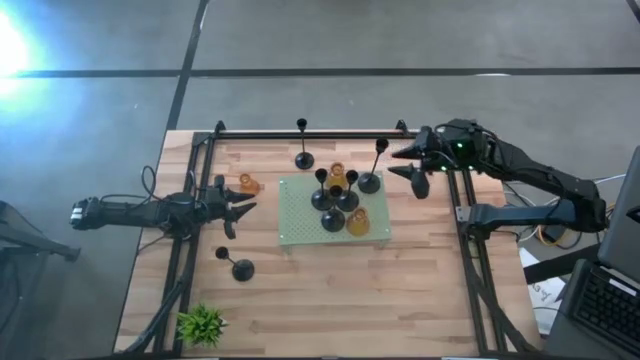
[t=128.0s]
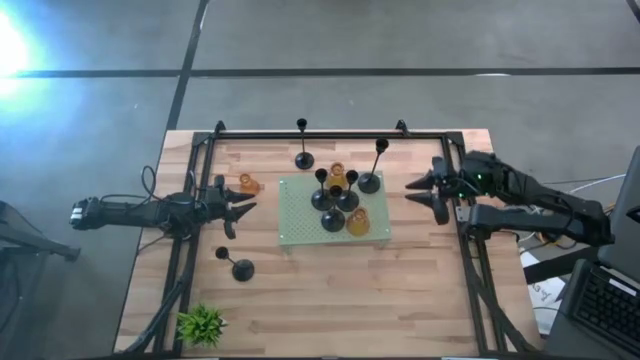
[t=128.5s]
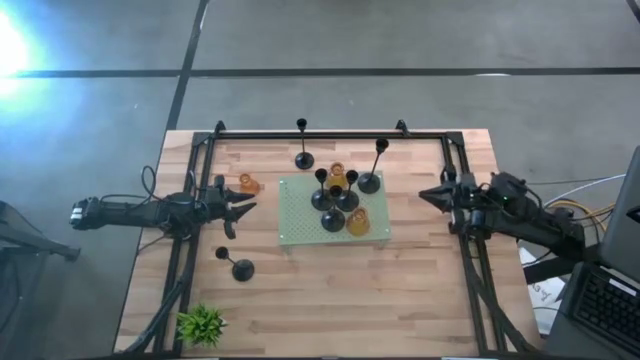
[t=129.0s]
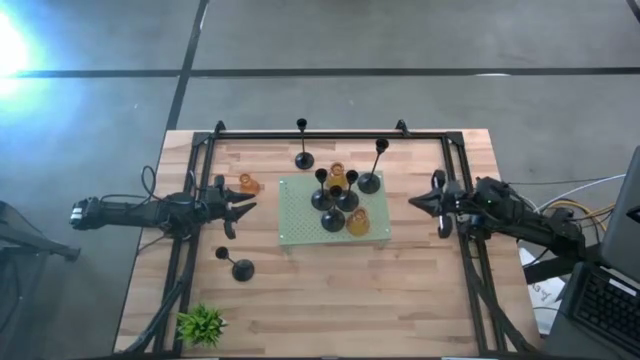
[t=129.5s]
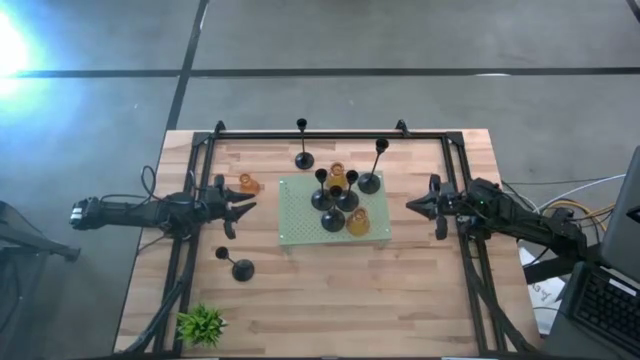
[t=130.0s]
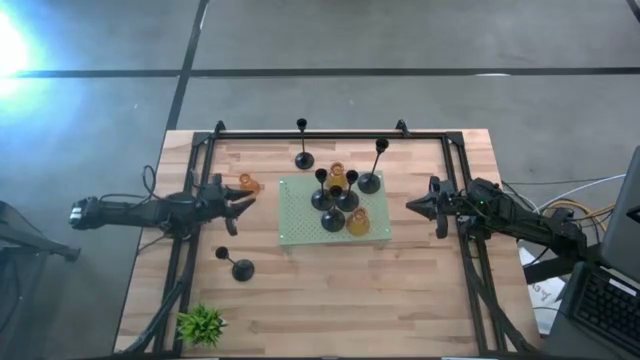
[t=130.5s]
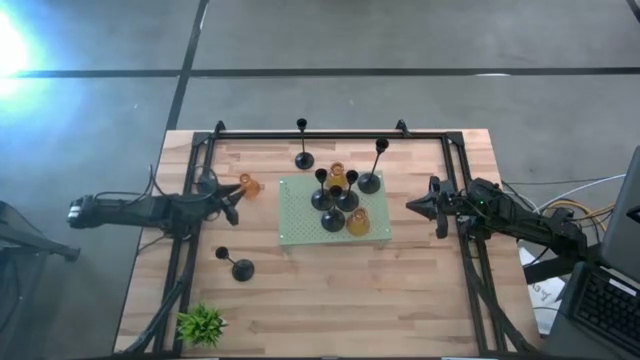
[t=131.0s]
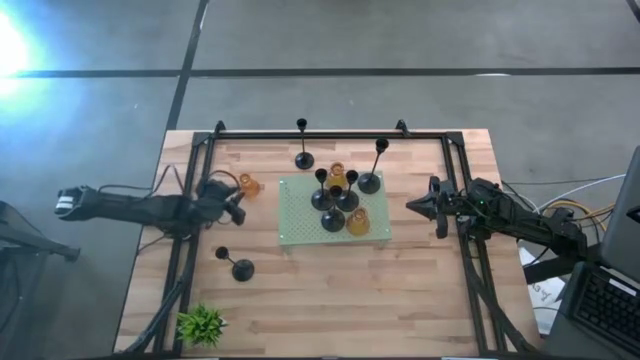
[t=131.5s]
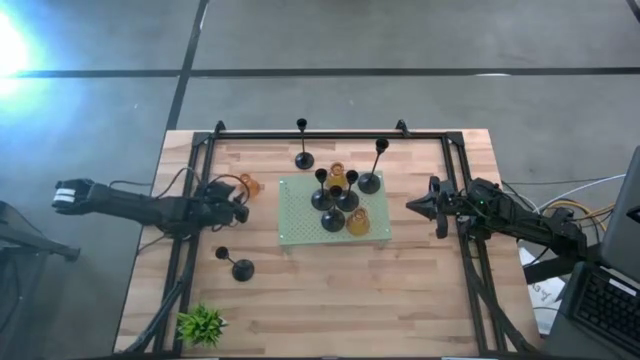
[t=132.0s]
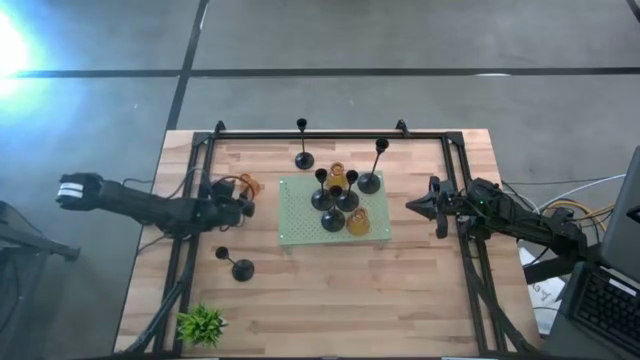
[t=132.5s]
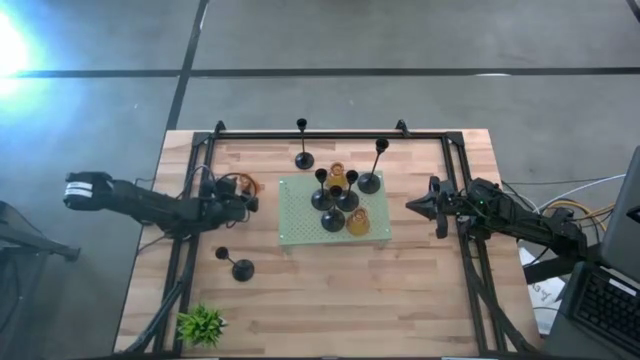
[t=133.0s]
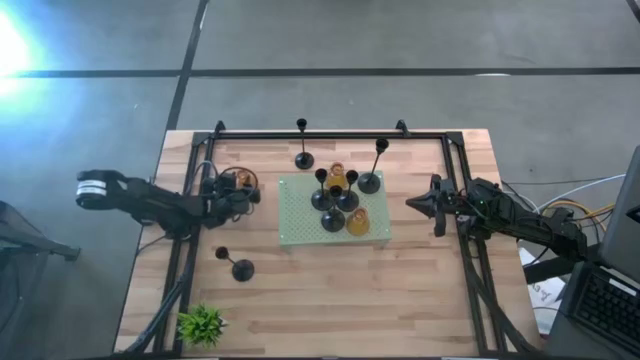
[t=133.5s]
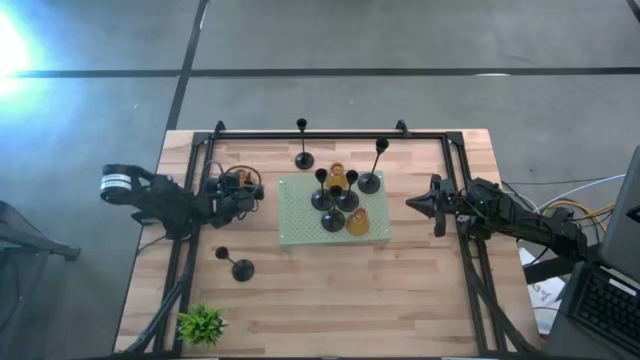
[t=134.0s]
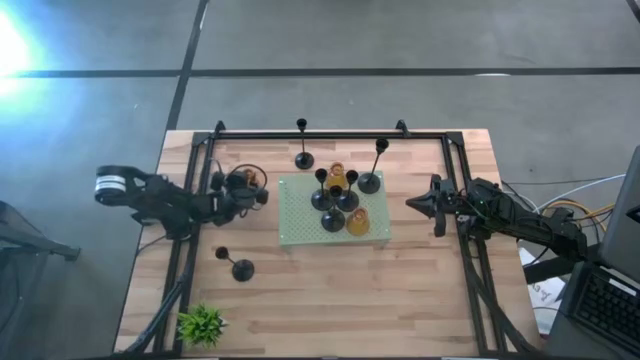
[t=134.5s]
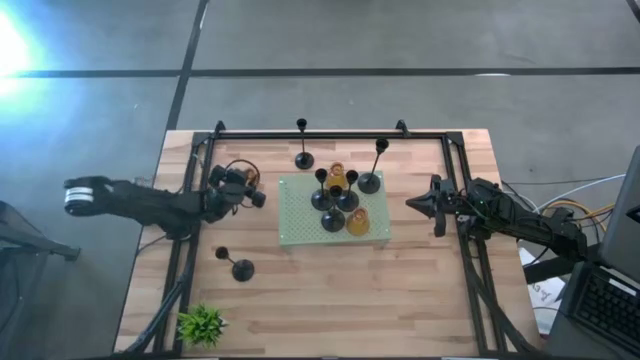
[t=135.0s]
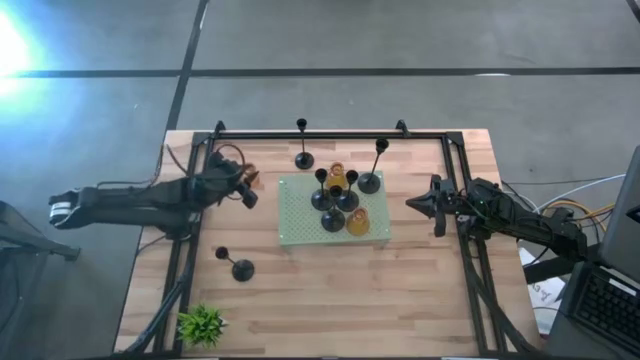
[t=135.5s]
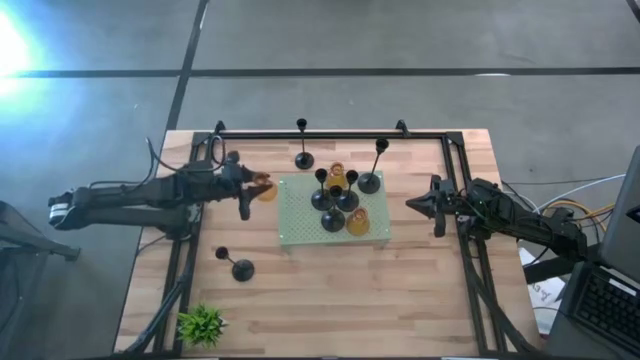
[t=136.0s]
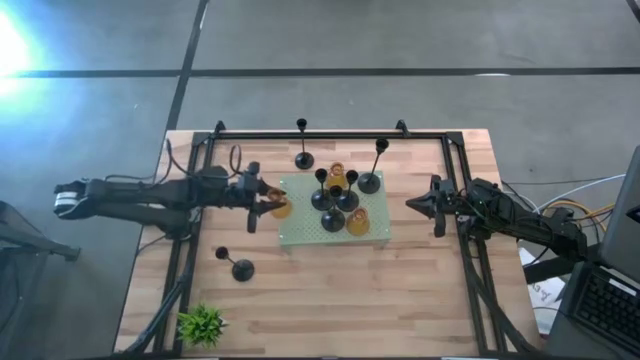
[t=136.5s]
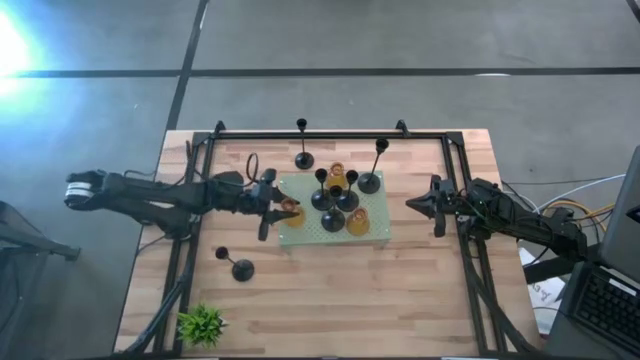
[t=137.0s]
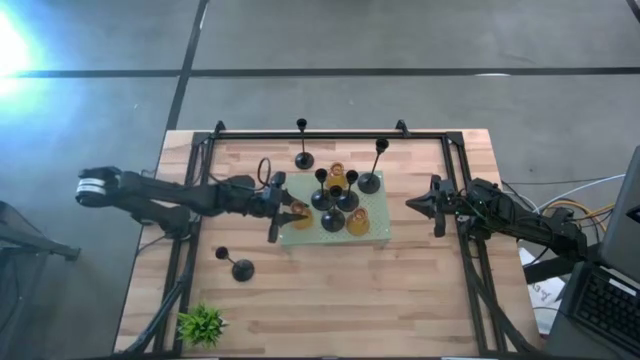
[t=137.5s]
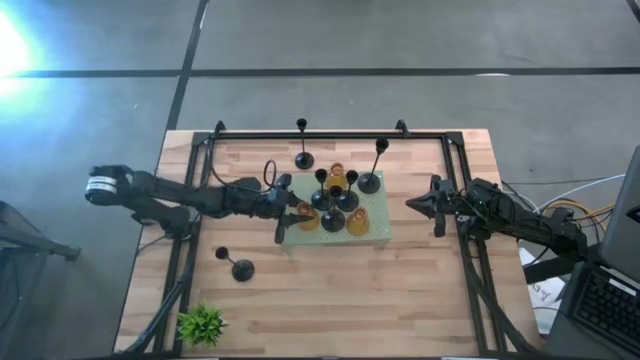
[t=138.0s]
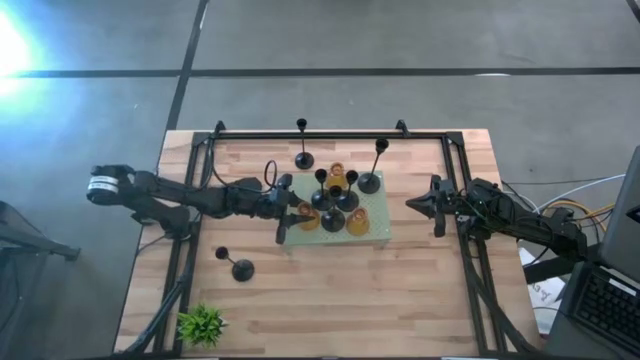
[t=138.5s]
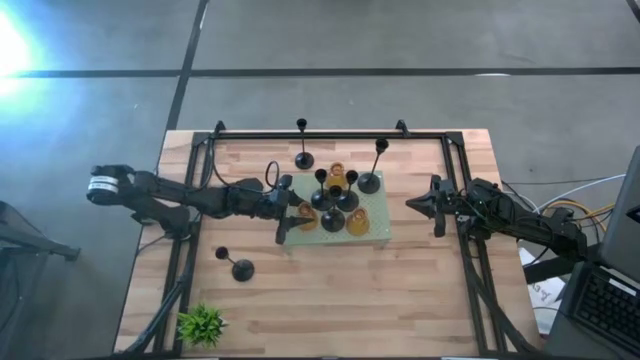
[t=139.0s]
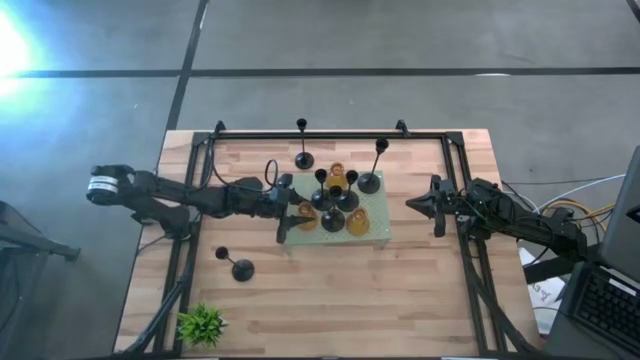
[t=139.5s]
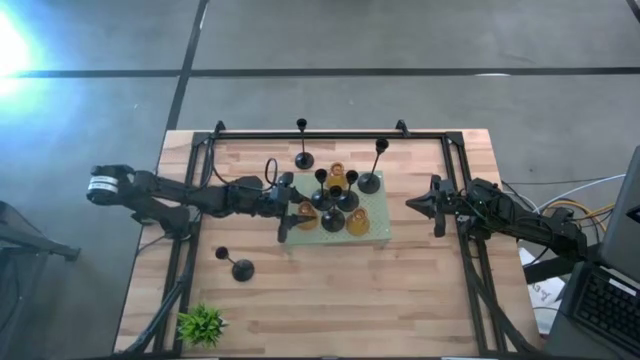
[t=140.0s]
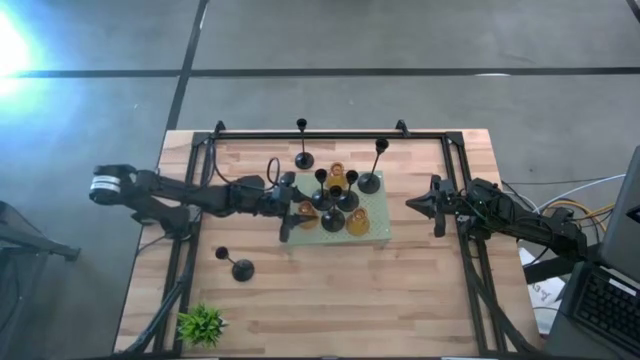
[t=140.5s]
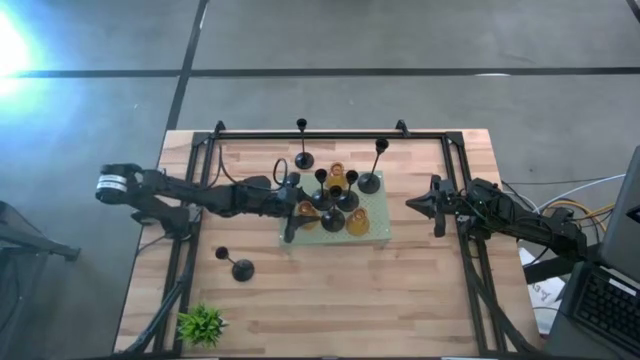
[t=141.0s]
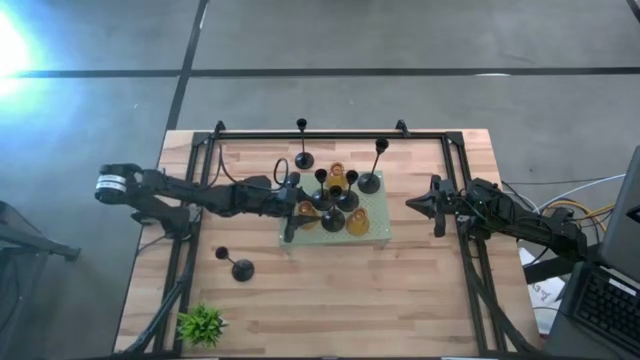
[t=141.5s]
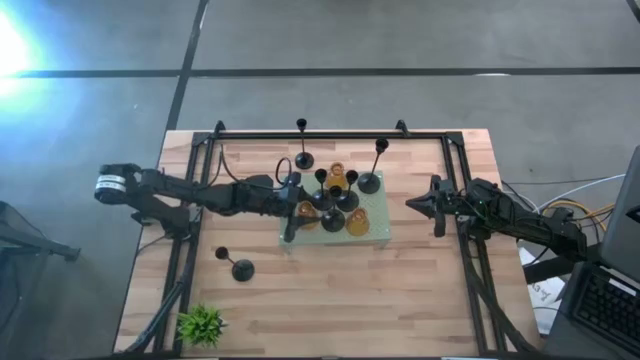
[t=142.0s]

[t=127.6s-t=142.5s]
Task: Pick & Place candle stick holders
Put the yellow glass on the shelf

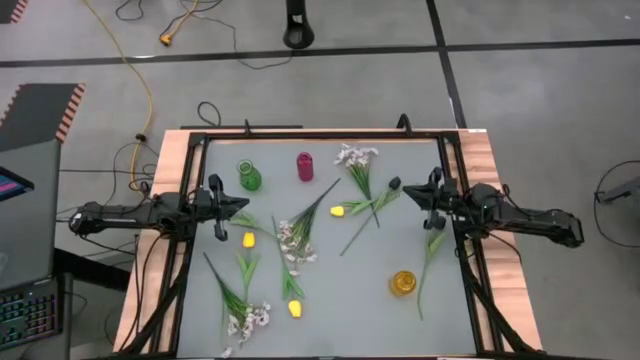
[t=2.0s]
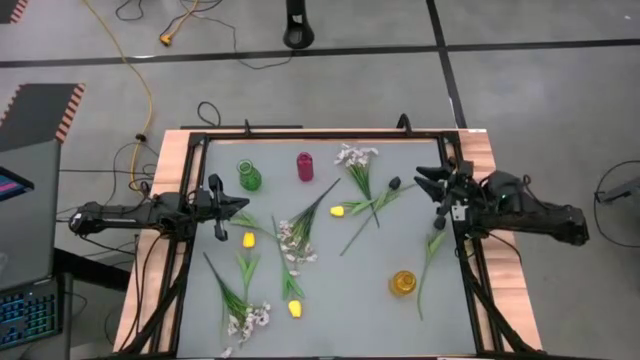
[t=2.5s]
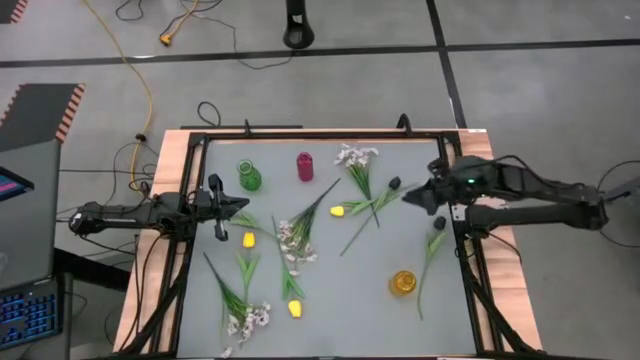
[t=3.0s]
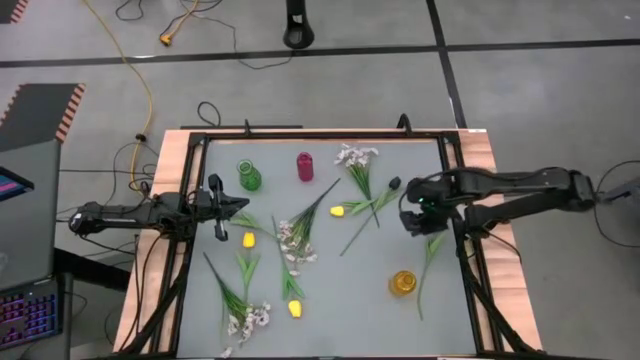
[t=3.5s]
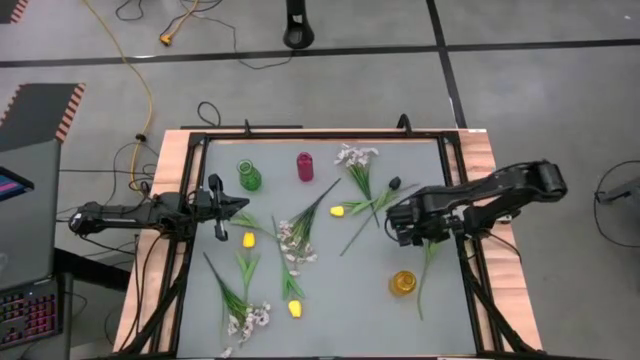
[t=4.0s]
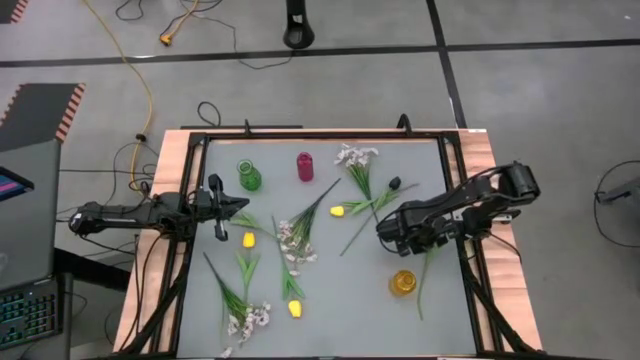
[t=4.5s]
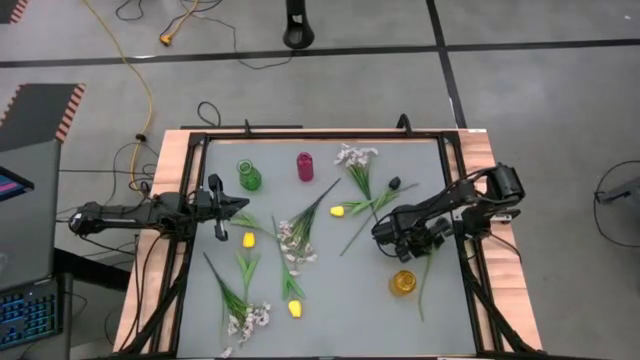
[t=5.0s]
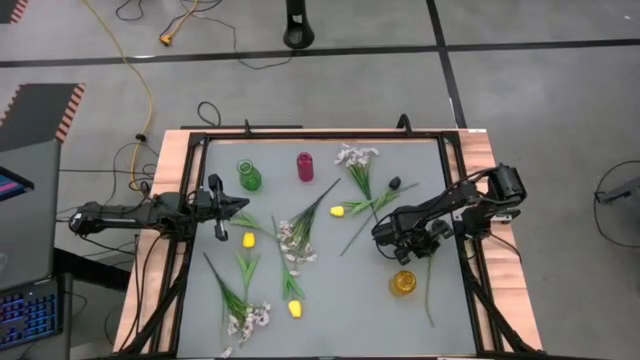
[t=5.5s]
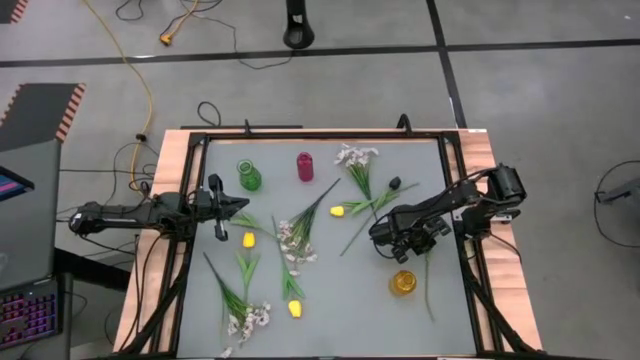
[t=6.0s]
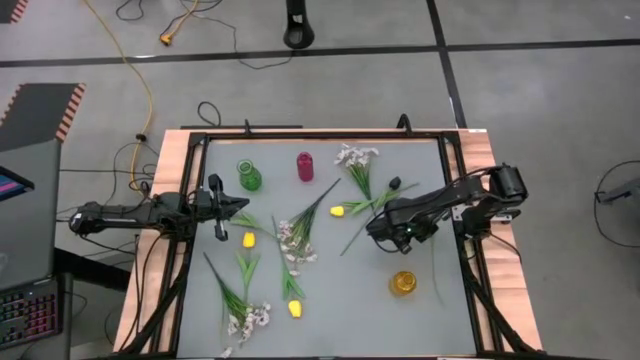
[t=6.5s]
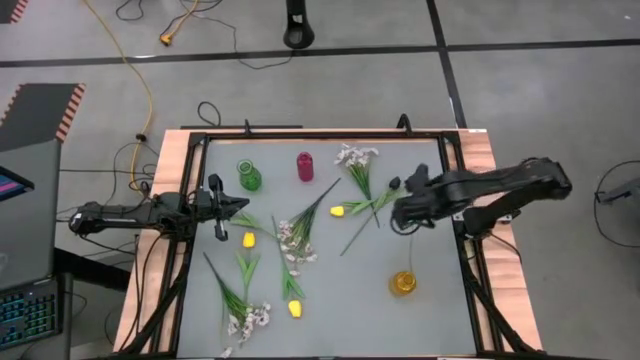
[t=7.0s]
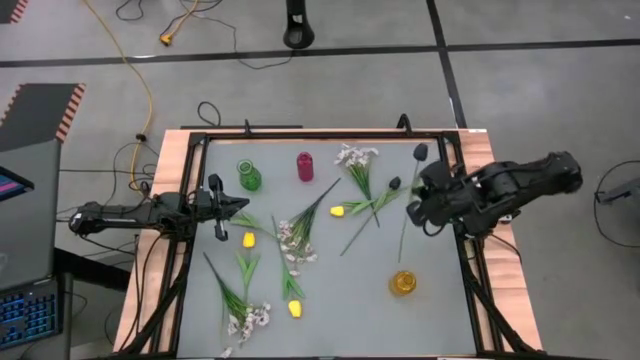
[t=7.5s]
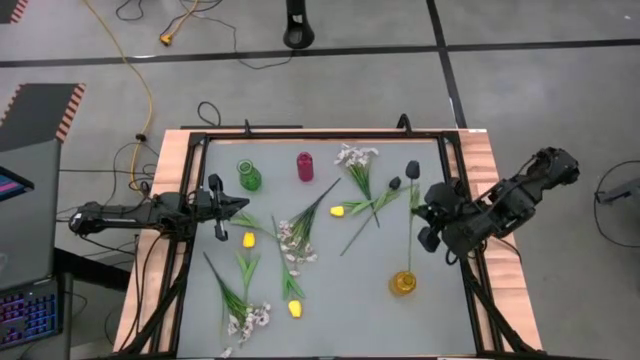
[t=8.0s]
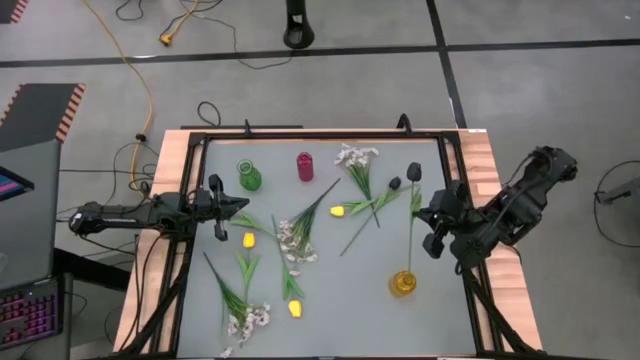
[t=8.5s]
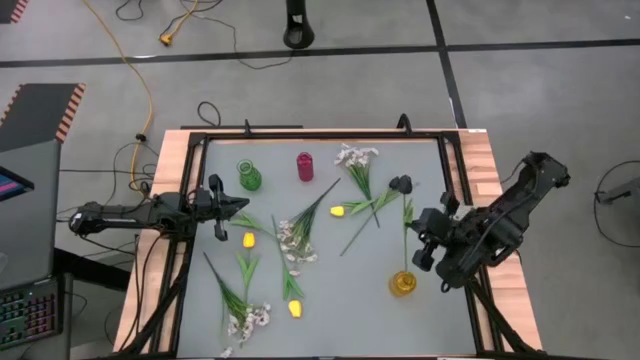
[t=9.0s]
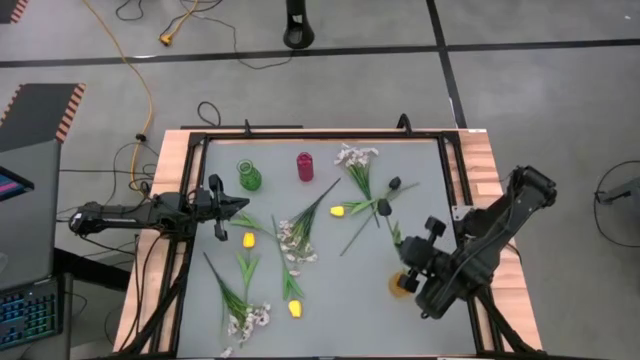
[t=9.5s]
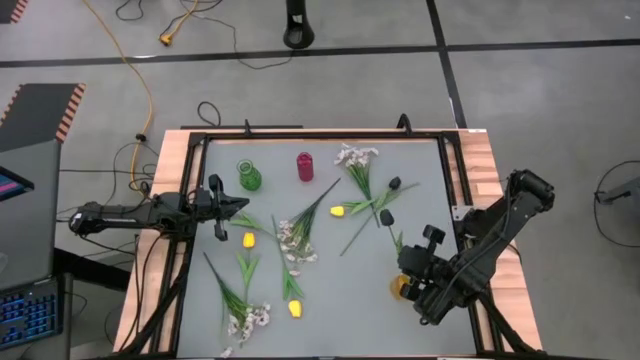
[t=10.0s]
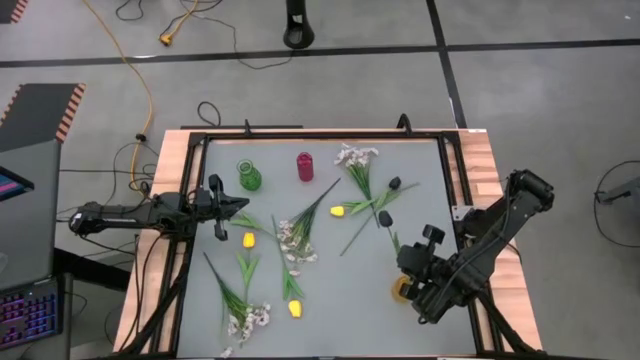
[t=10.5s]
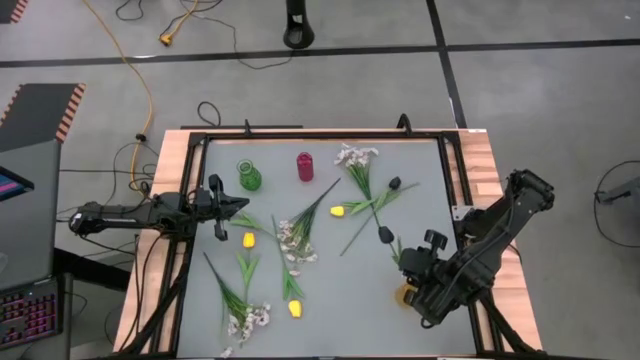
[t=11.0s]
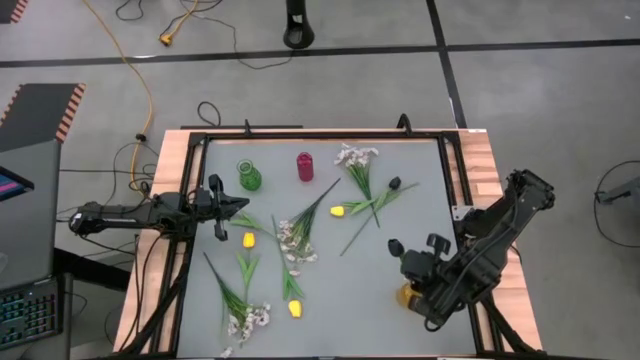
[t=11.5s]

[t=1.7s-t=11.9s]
Task: Sort flowers into vase by color
Put the bottom black tulip into the yellow vase
